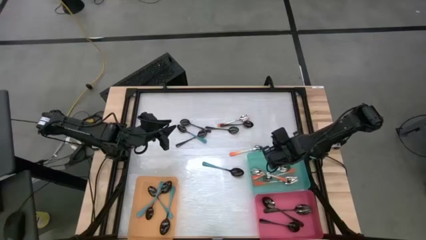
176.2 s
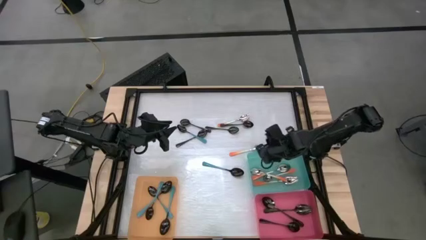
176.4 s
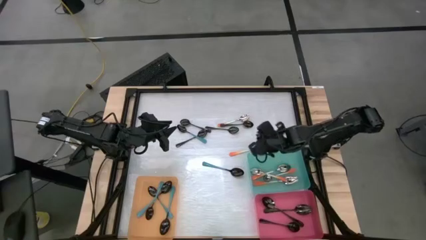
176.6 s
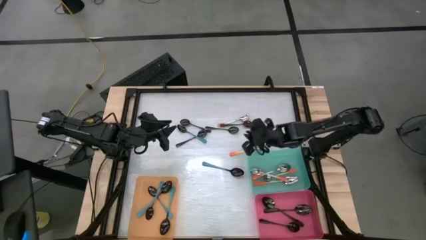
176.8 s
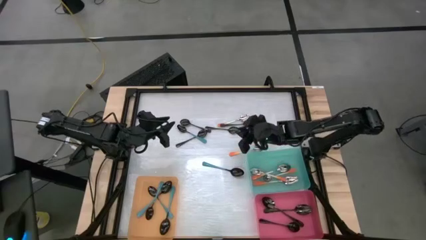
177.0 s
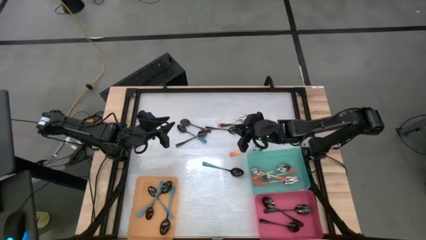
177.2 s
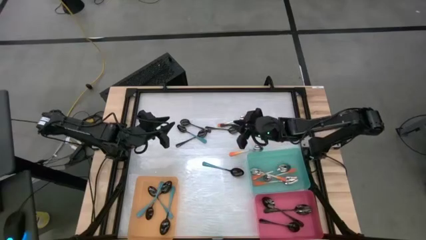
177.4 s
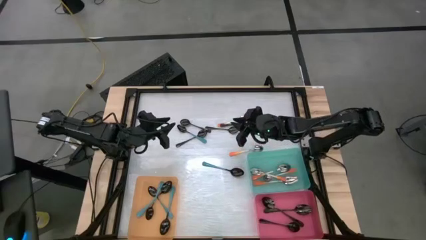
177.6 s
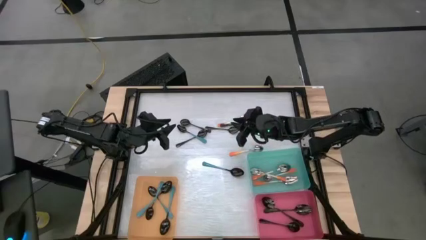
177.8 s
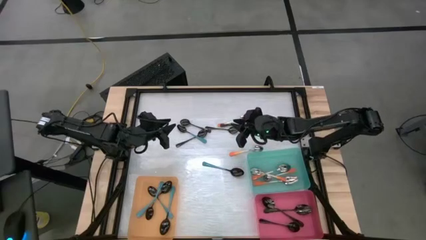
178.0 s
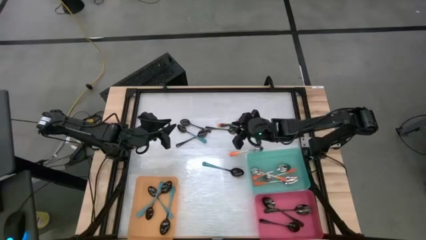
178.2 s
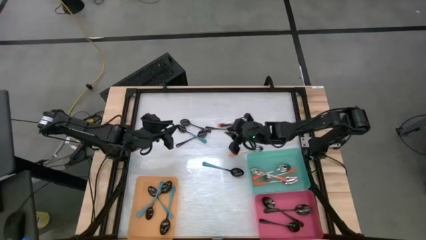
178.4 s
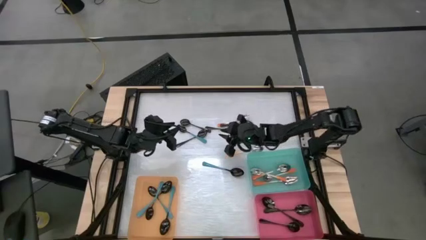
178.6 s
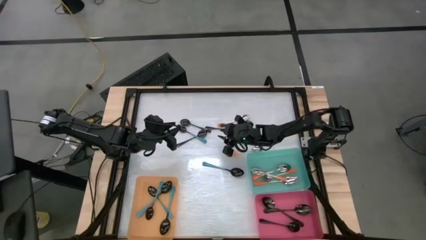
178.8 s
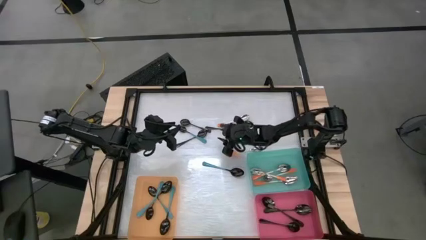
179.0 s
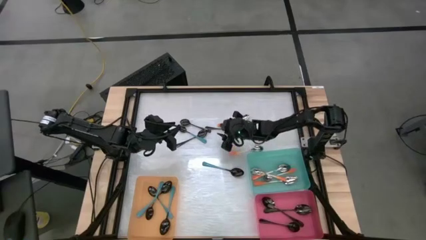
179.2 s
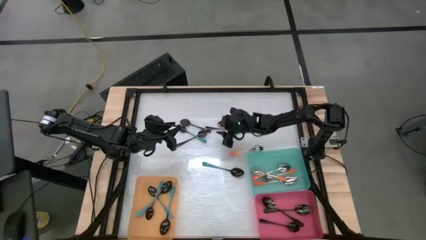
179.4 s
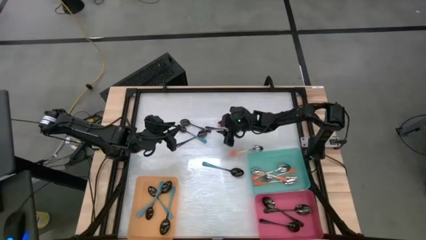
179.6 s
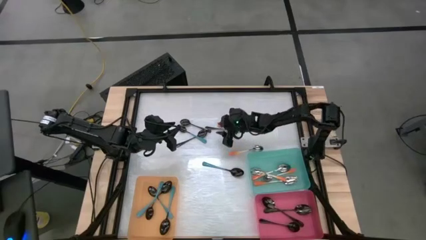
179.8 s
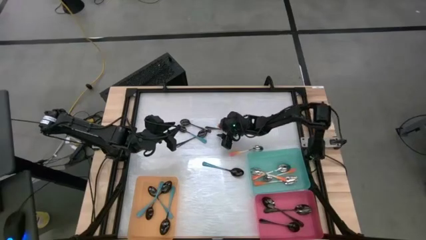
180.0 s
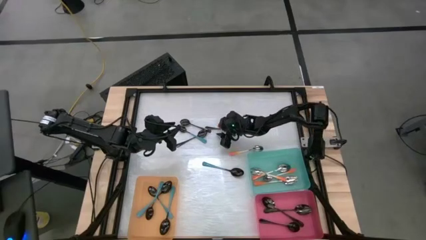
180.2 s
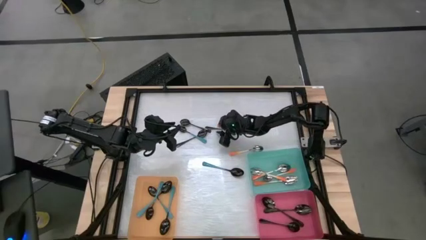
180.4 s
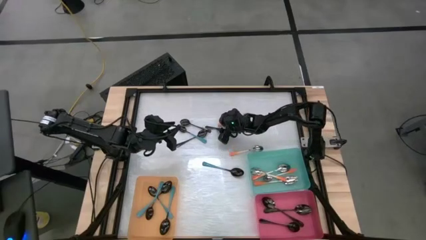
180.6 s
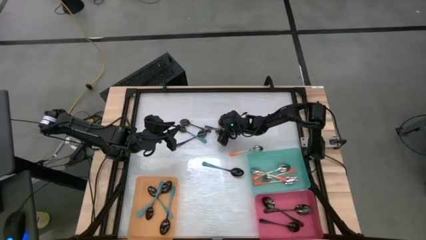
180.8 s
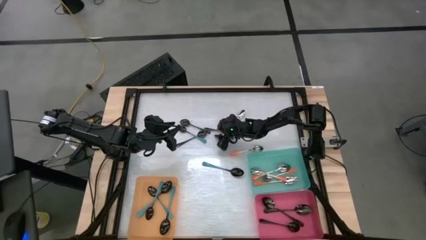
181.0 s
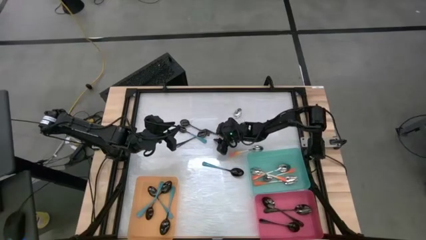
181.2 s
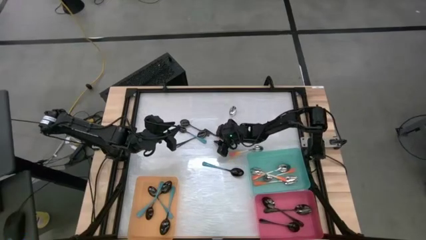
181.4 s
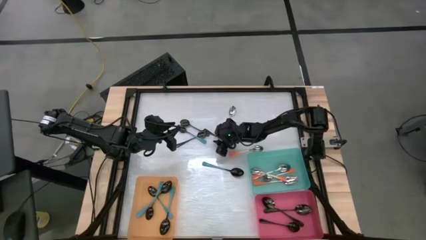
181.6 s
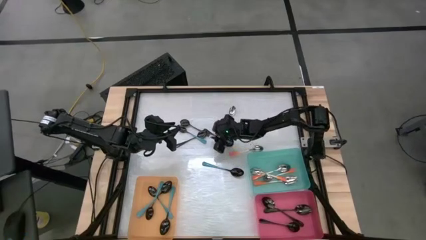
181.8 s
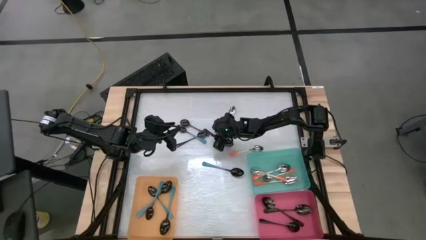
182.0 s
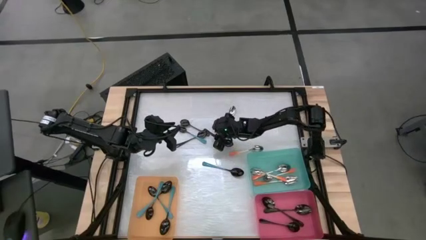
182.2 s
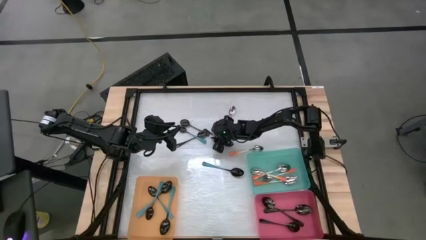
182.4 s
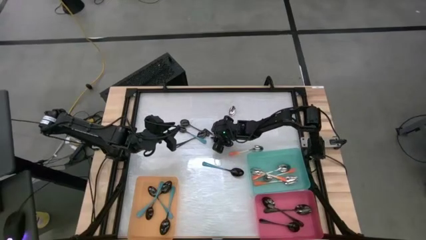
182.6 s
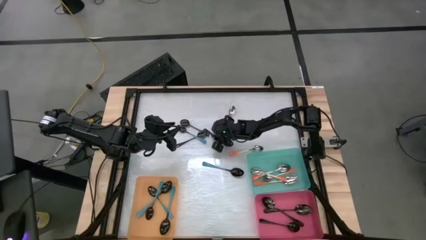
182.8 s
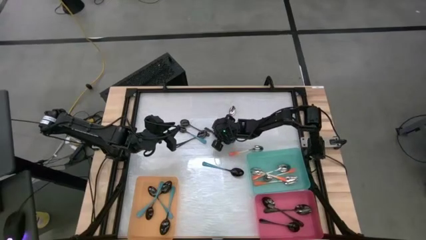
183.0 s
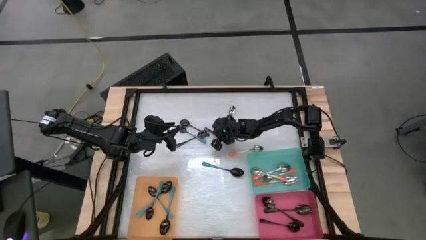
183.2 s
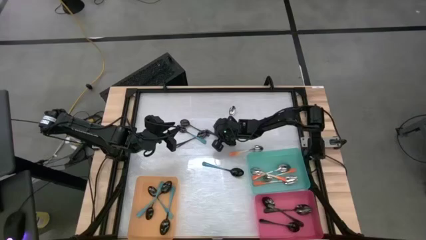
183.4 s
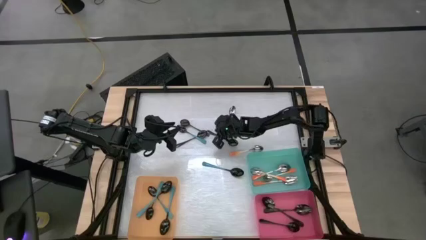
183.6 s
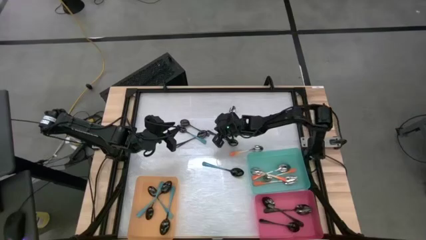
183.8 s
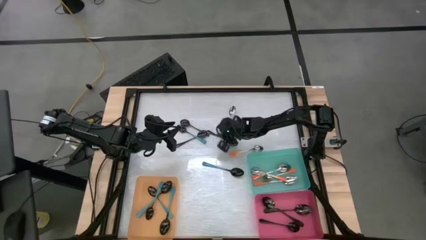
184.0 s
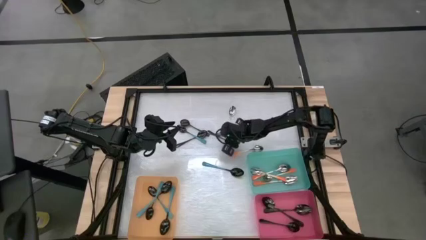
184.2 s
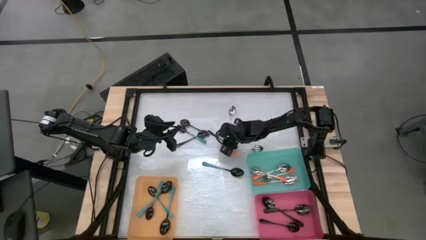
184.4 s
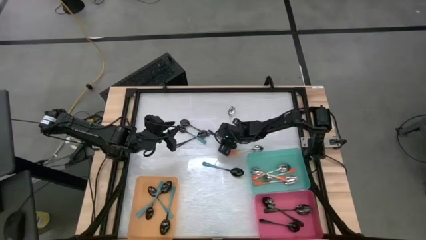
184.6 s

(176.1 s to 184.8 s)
Task: Sort silverware by color (type)
Put the black spoon into the pink bin

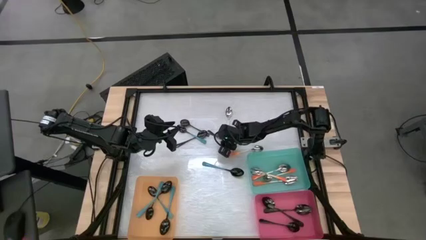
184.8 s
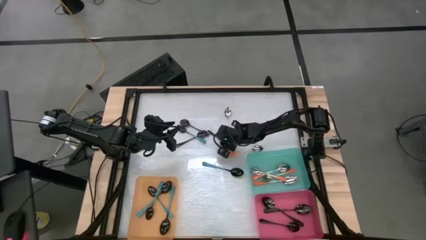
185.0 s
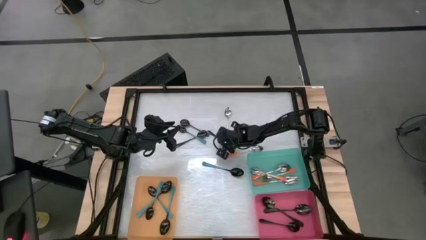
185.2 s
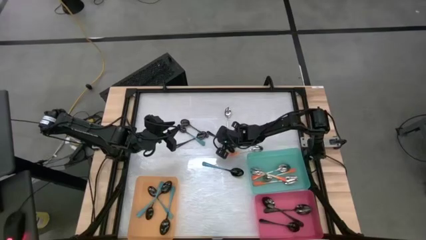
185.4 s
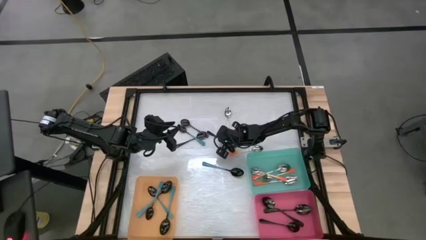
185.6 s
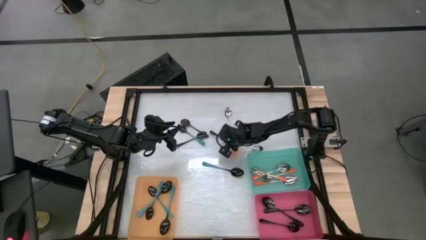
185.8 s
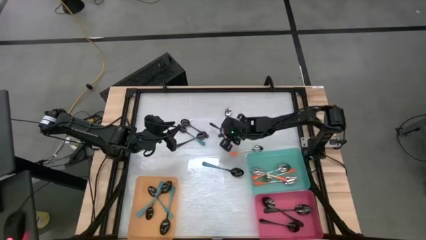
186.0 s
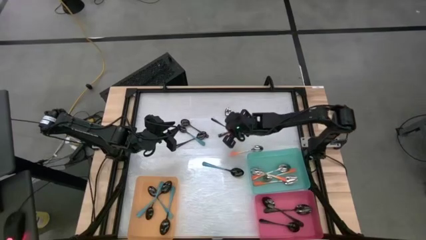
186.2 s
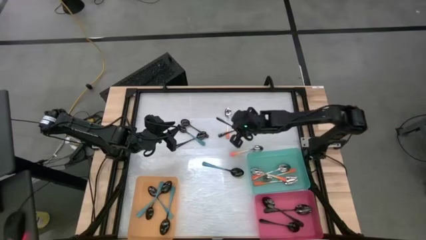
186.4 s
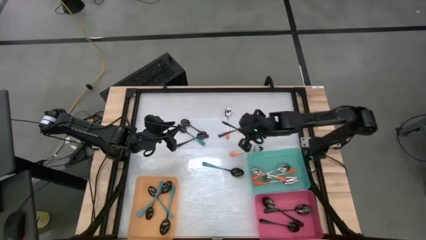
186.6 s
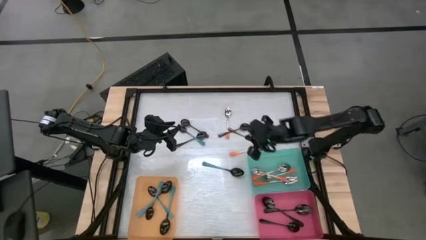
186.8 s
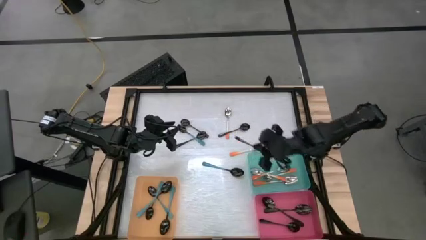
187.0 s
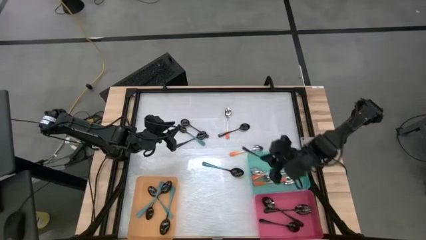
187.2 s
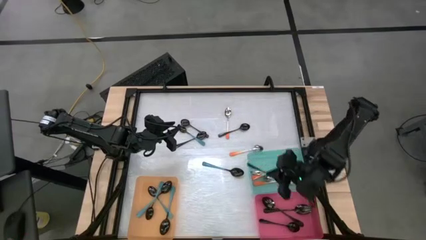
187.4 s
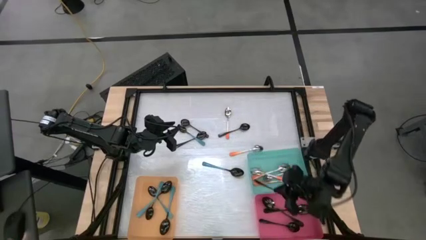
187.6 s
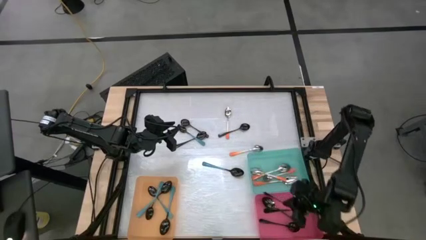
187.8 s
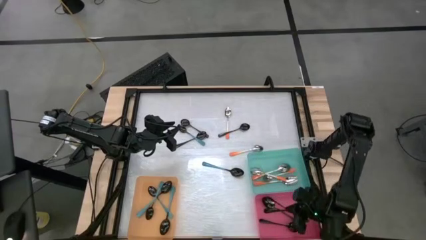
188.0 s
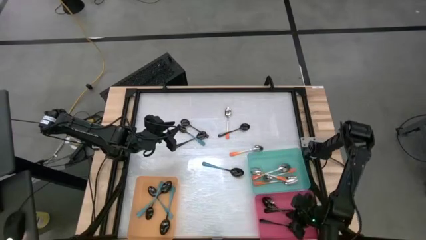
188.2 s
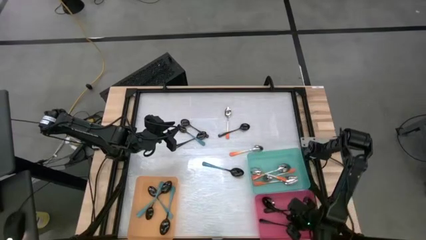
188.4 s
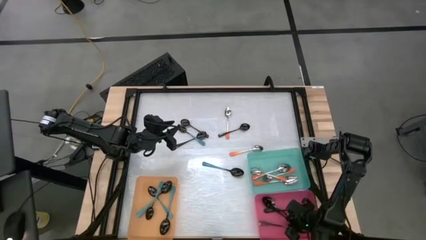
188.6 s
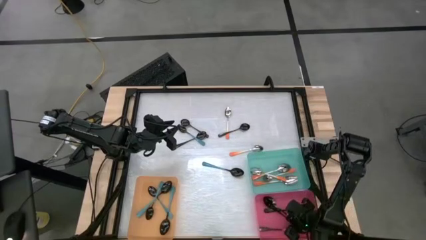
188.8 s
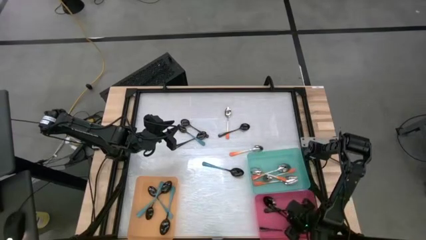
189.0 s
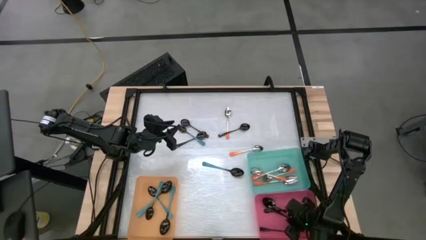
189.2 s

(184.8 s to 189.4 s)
Put the black spoon into the pink bin

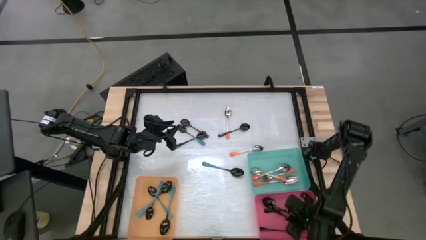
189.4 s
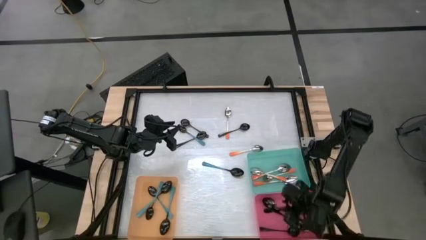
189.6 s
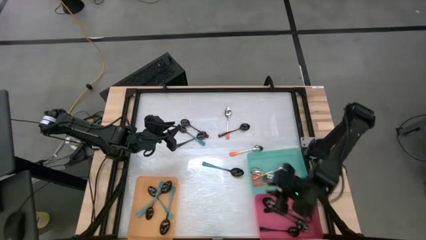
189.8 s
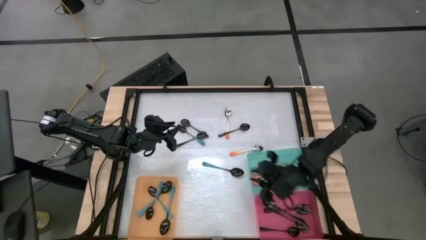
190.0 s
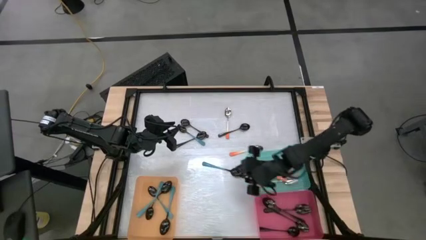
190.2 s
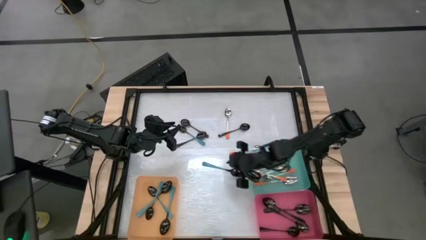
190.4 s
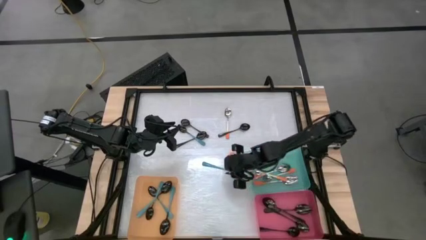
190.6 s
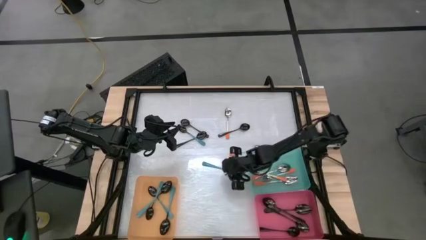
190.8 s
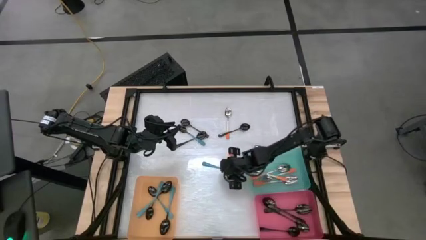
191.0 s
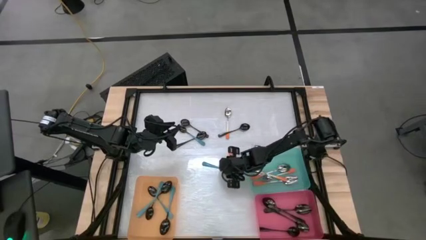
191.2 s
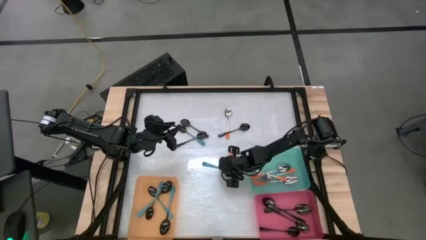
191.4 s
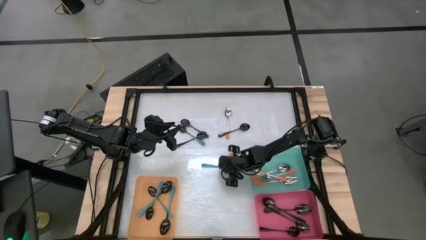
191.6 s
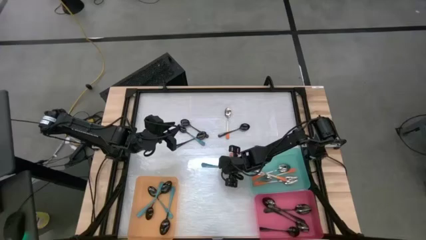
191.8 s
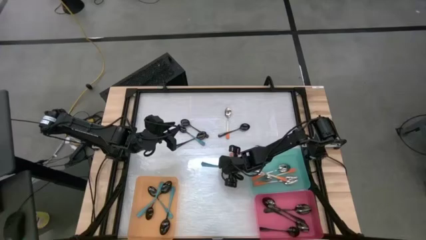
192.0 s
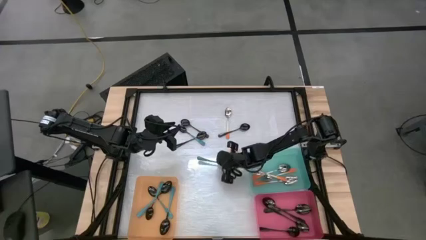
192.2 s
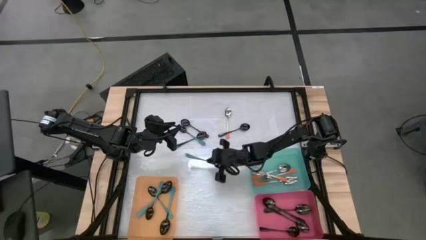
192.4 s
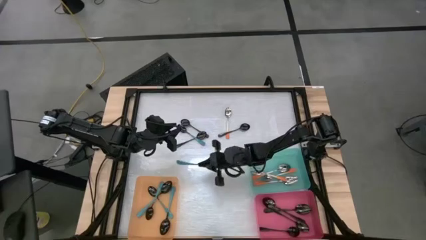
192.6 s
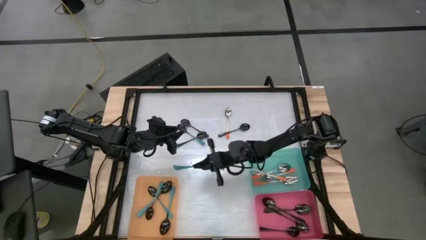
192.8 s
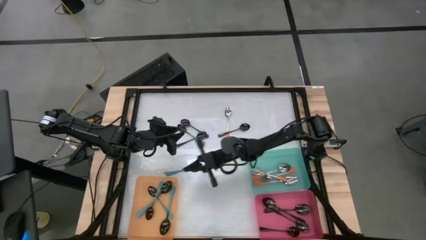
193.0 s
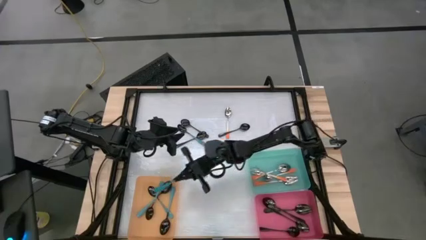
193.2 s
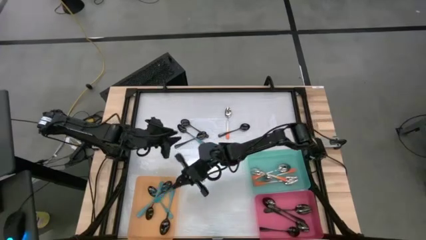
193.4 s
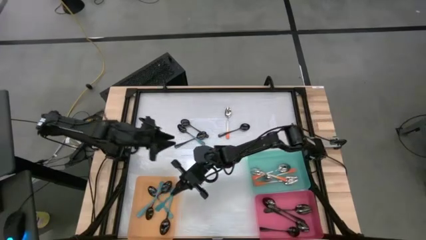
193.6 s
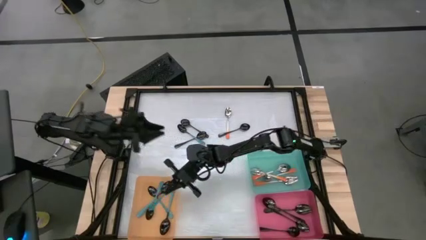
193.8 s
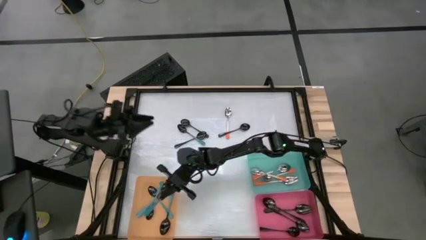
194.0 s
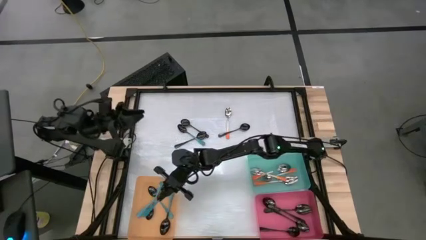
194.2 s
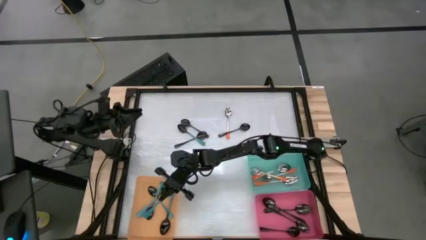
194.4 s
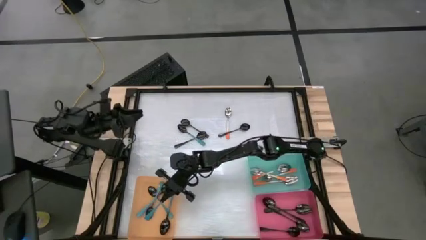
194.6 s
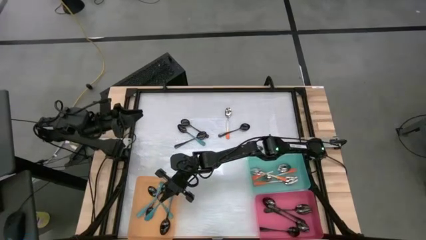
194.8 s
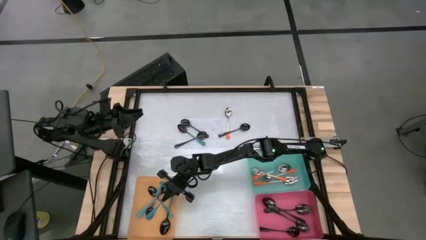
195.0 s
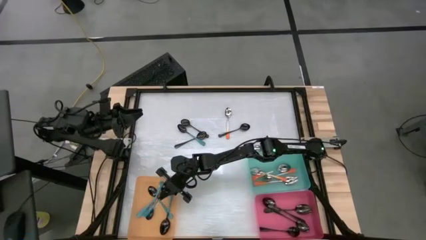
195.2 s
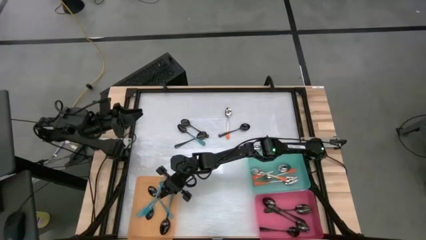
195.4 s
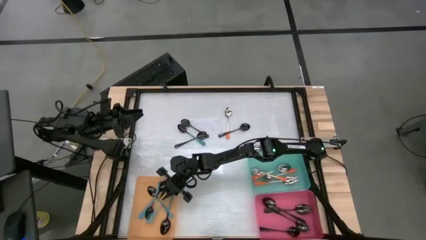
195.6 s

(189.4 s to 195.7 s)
Put the blue spoon into the orange bin
